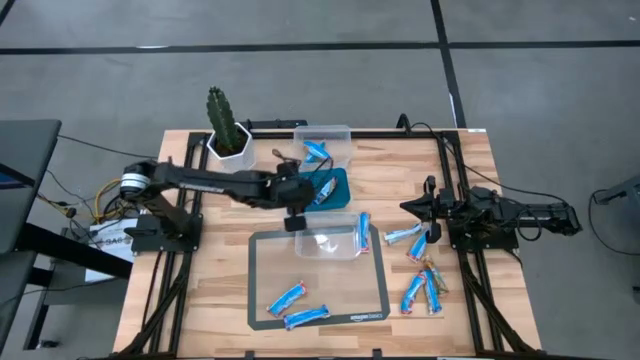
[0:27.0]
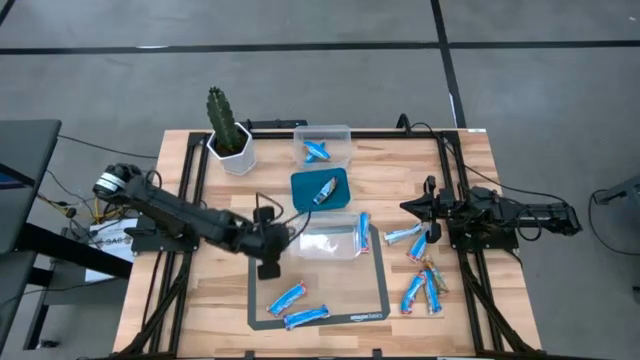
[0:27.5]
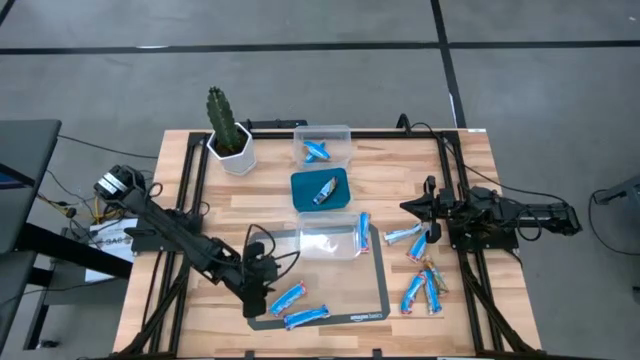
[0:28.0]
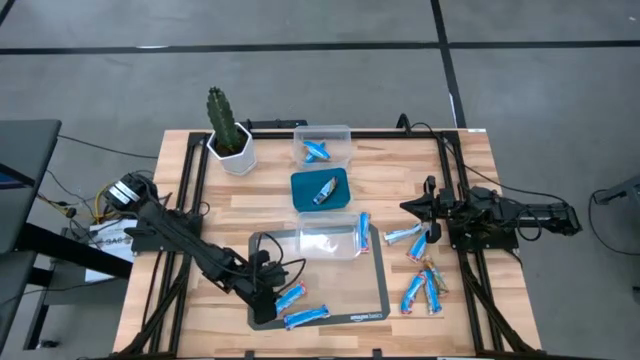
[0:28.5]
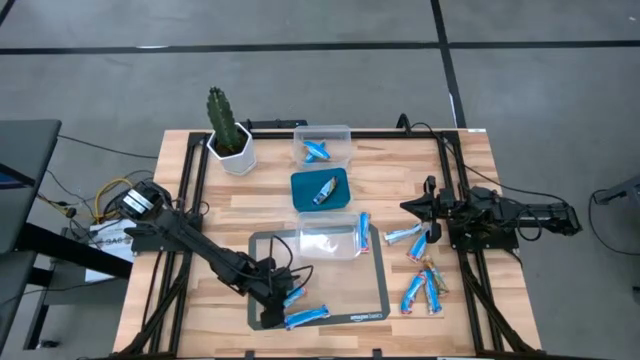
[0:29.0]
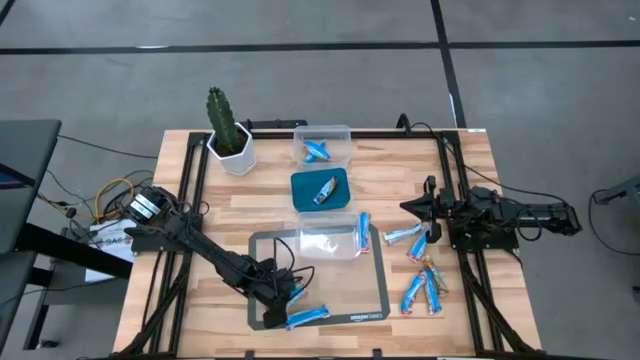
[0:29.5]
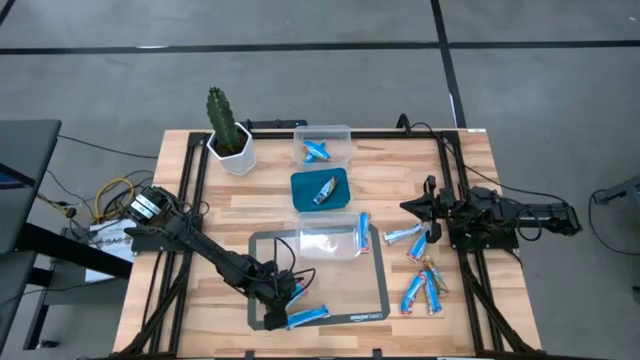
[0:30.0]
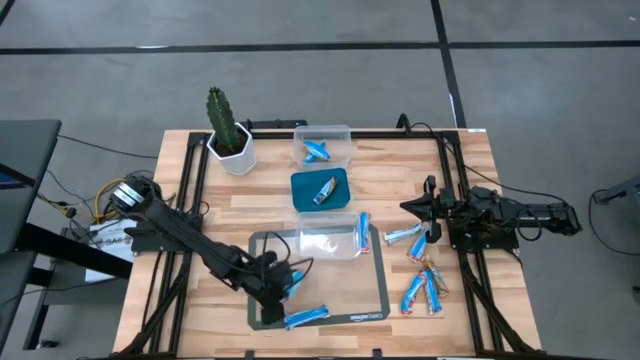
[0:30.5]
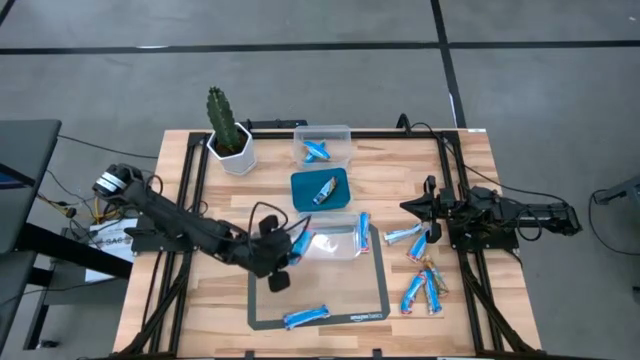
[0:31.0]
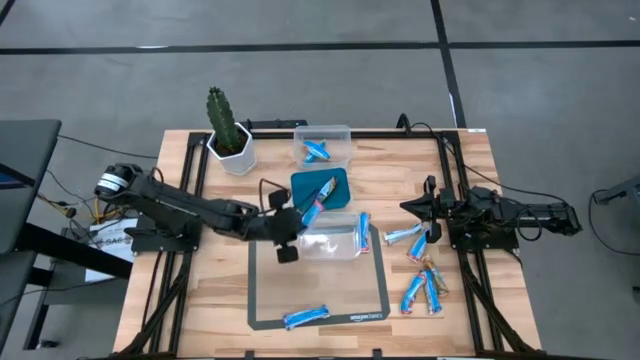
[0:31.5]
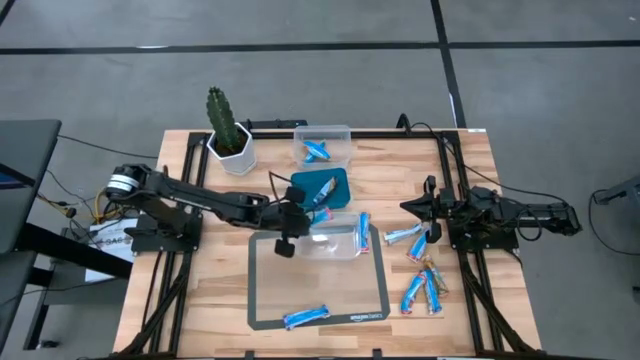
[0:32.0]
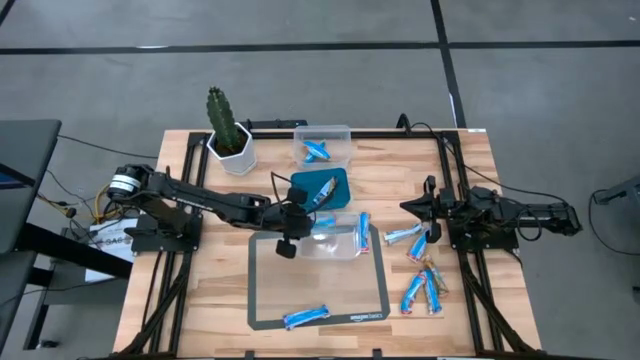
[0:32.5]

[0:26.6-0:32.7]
Task: Pick and place Granola Bars by type
Put the red granola bar into the bottom transparent bin

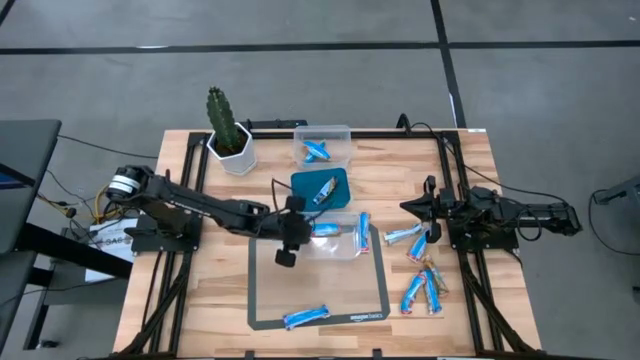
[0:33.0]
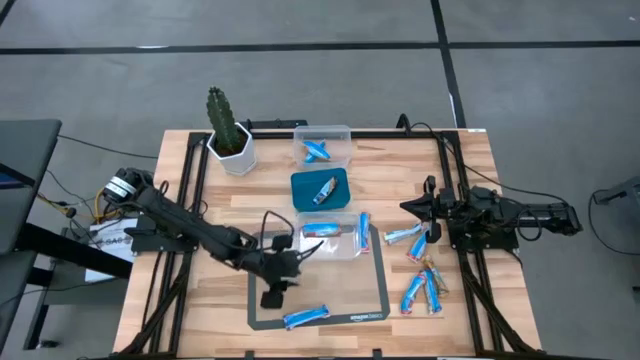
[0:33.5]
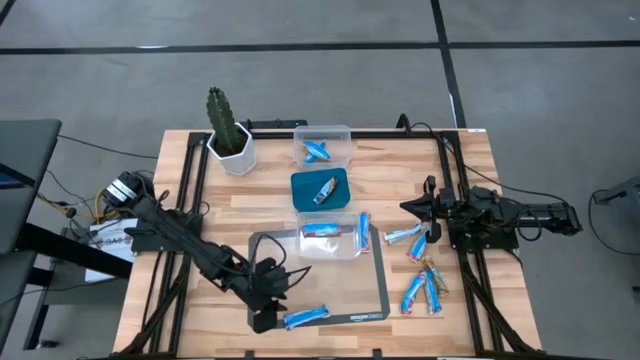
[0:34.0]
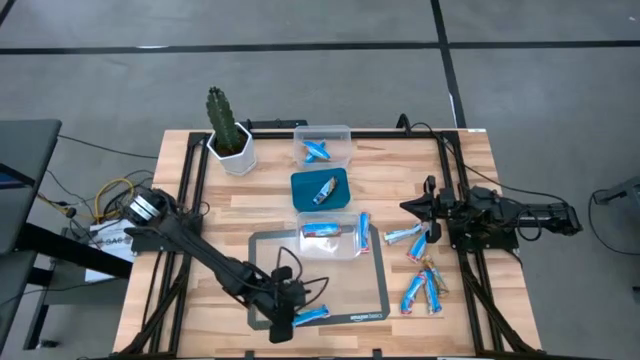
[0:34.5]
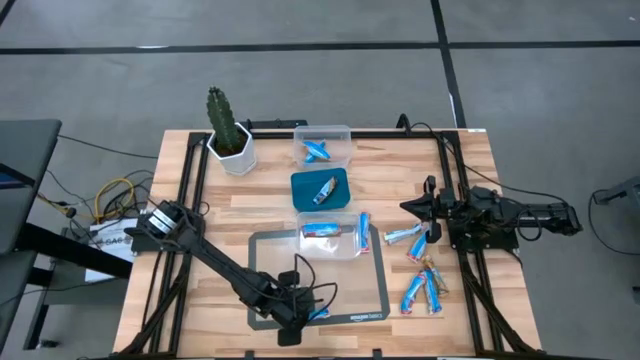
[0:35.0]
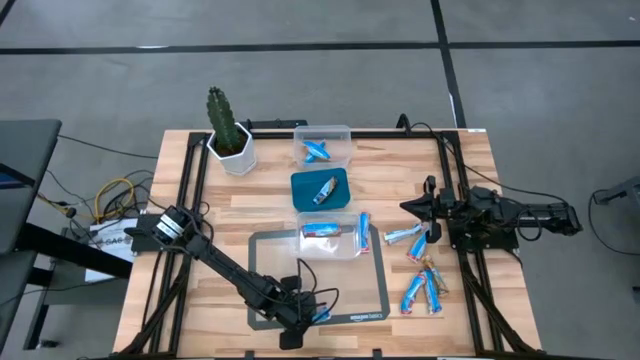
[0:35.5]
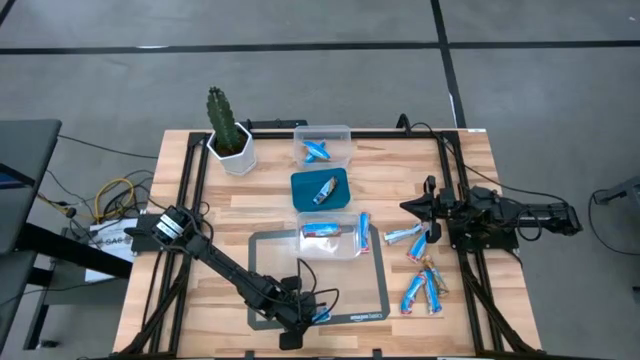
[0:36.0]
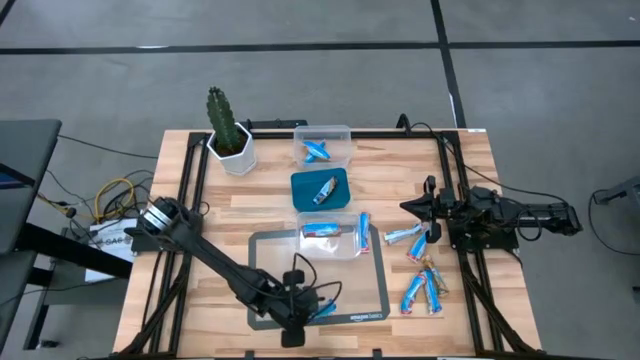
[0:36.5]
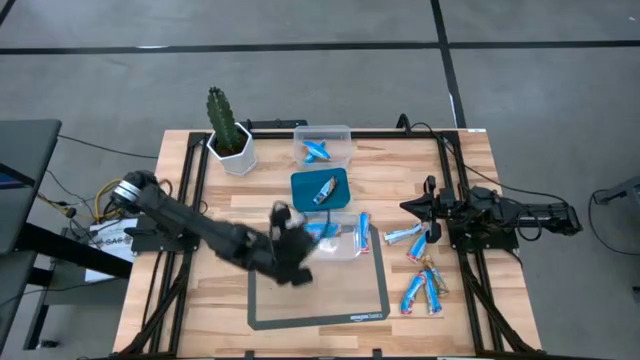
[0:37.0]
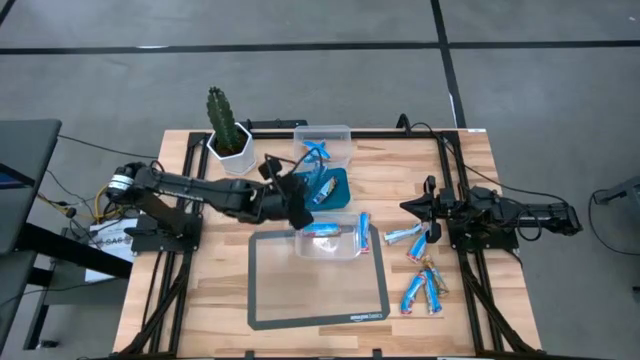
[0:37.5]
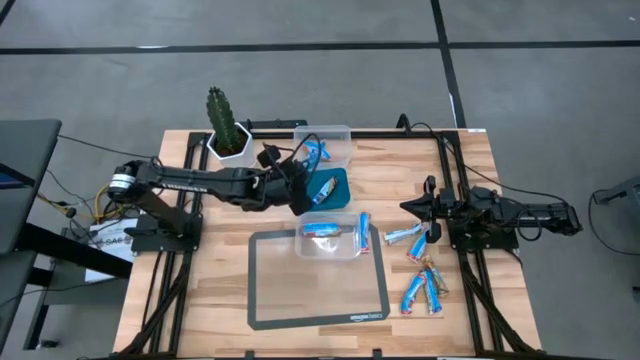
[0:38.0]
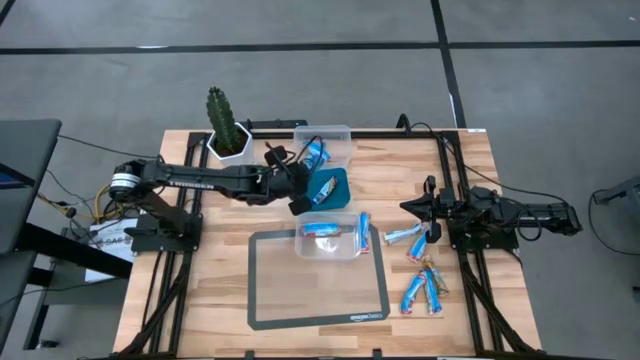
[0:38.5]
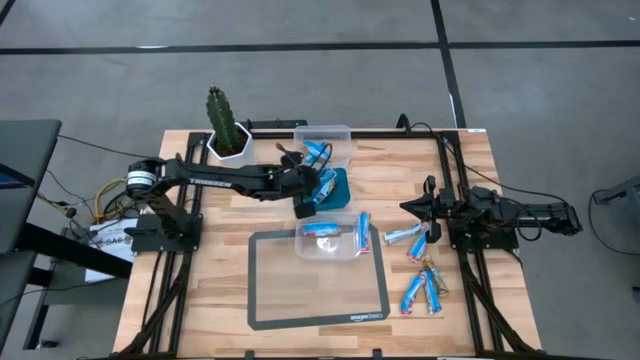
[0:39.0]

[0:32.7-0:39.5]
Put the left blue granola bar into the blue bin

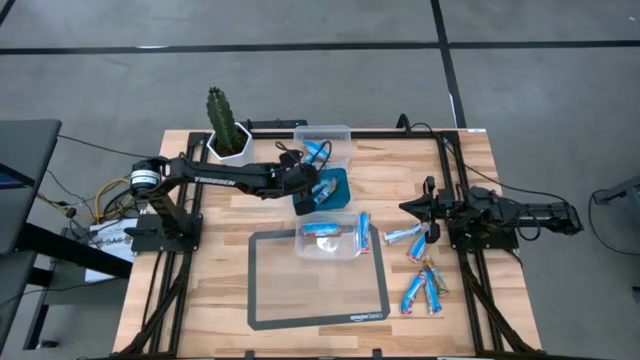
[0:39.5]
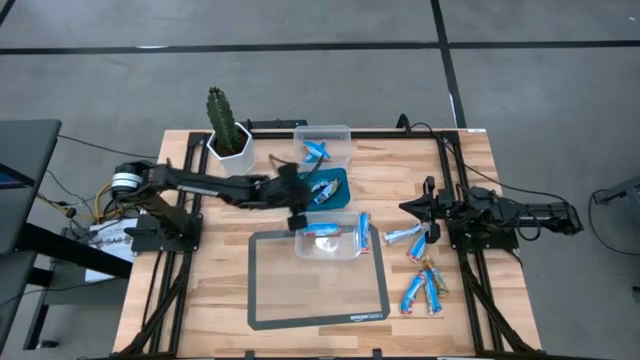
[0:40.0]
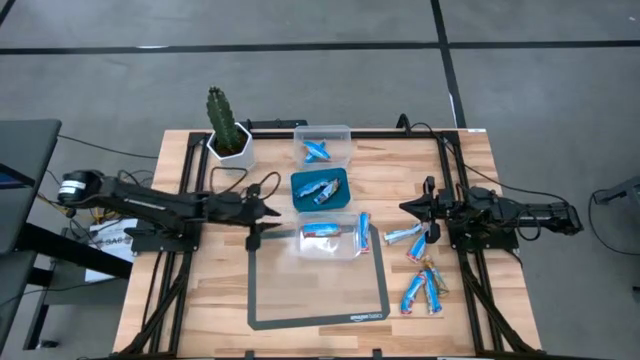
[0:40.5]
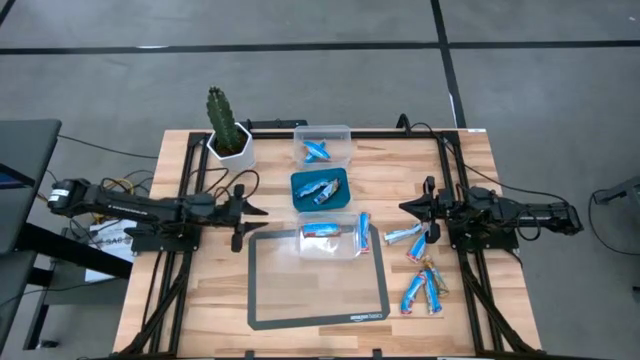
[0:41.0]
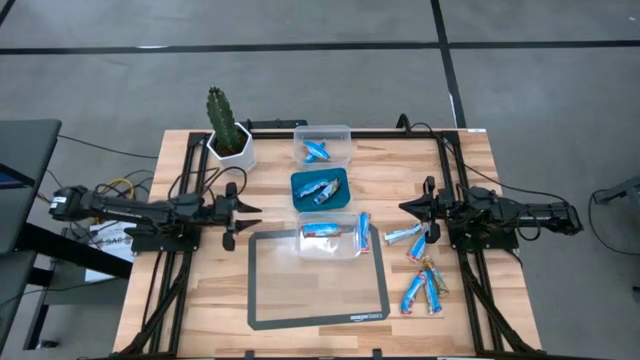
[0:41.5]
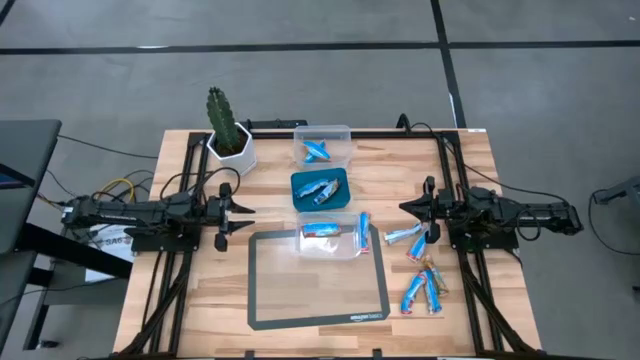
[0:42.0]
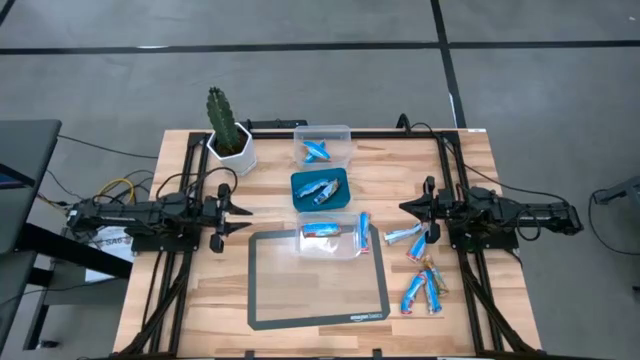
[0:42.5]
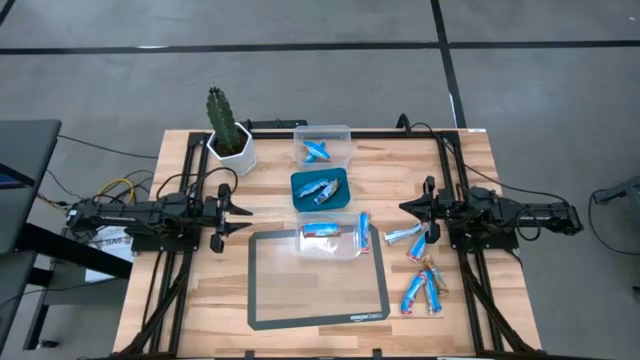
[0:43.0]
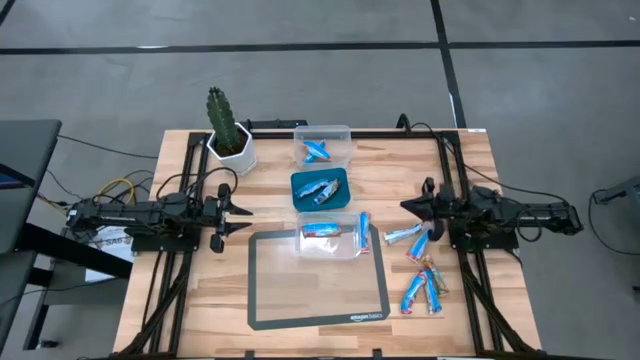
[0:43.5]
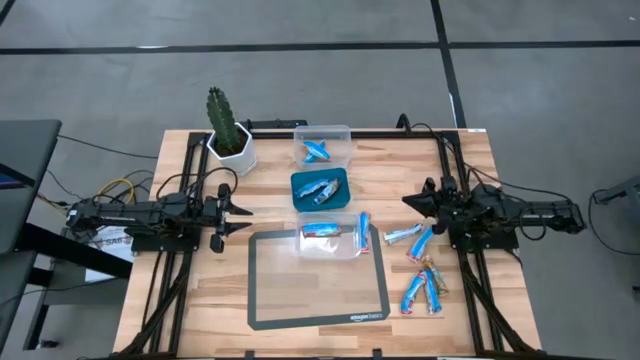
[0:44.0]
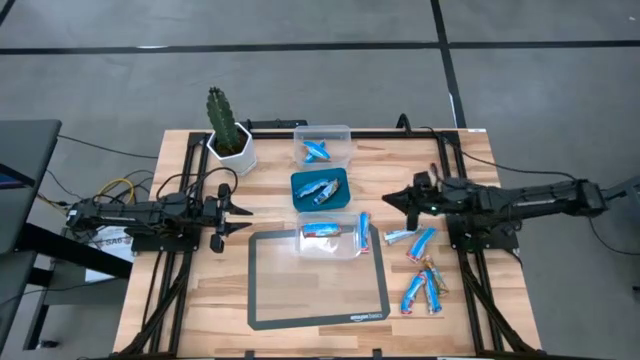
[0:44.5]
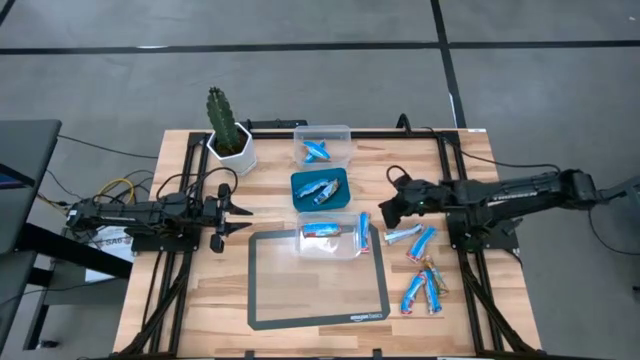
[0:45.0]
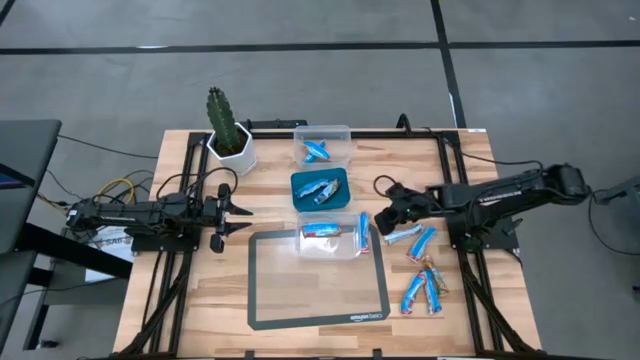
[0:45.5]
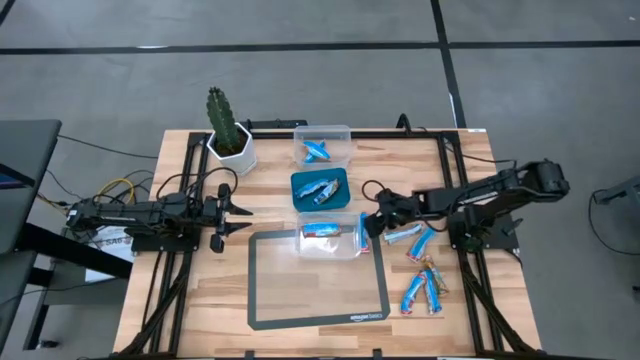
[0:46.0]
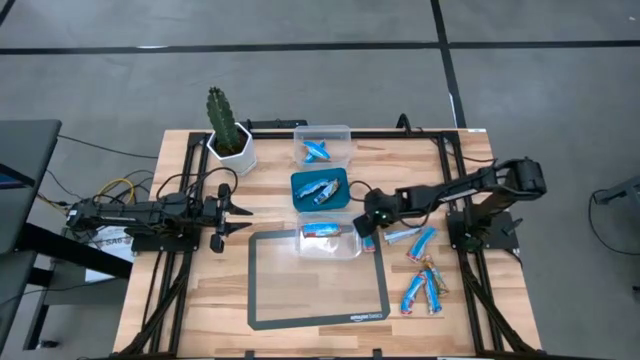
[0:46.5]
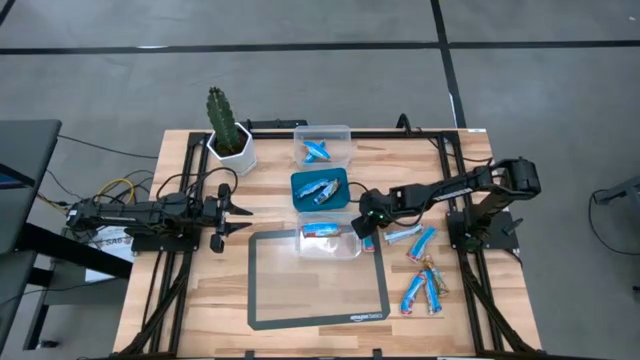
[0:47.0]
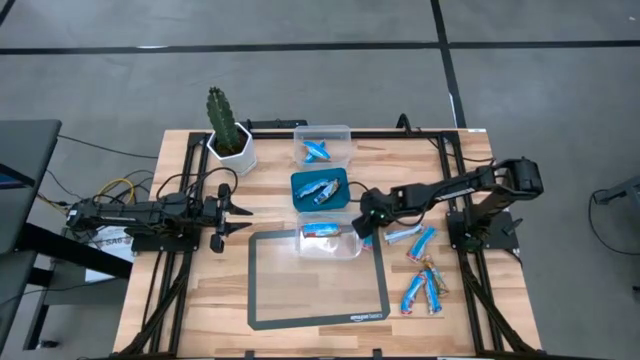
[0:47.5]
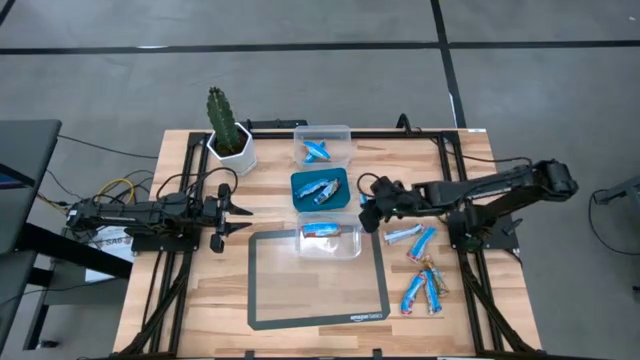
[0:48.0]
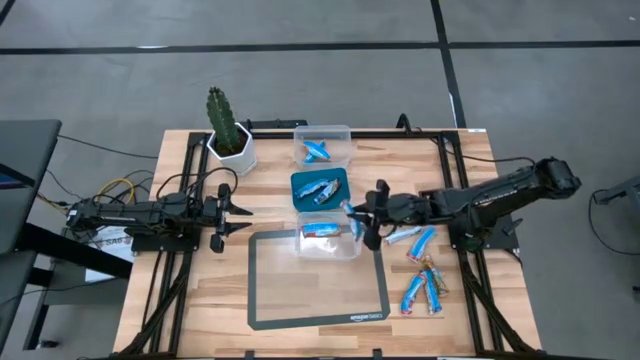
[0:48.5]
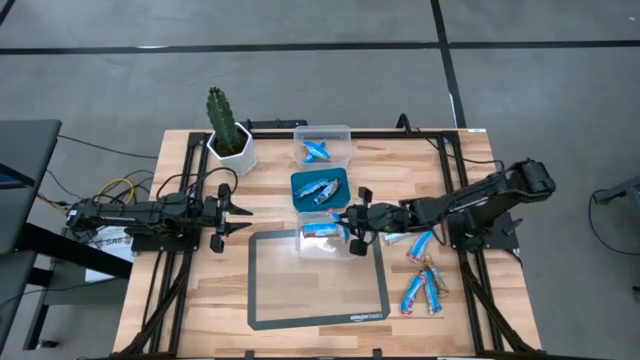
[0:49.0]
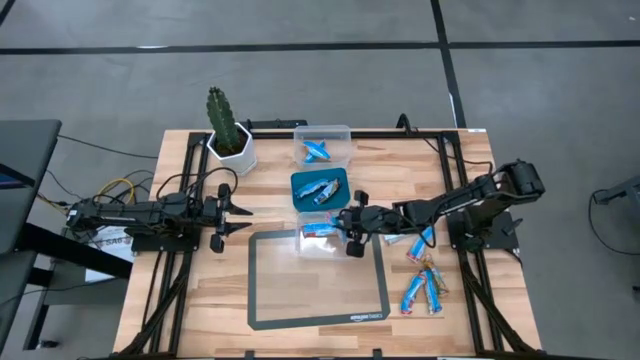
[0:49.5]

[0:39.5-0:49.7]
Put the top left red granola bar into the bottom transparent bin
